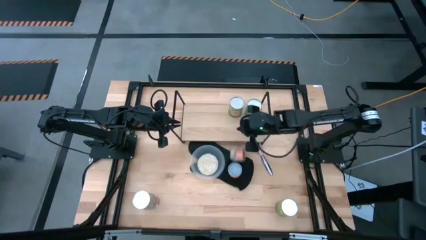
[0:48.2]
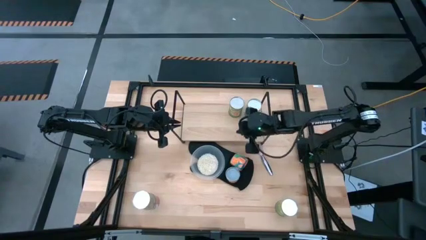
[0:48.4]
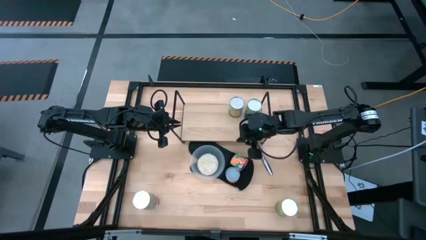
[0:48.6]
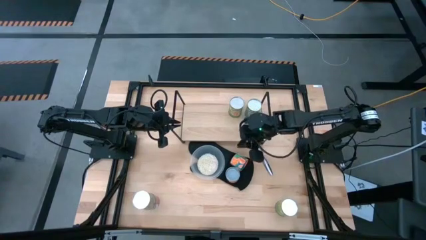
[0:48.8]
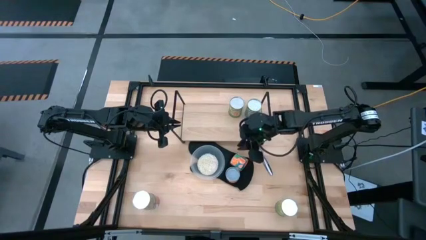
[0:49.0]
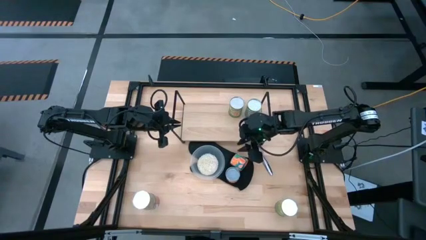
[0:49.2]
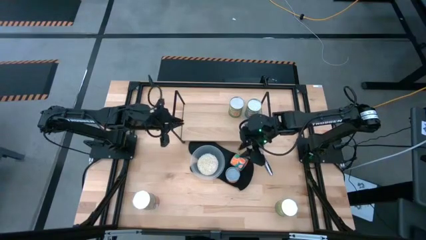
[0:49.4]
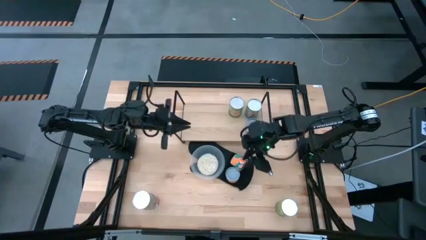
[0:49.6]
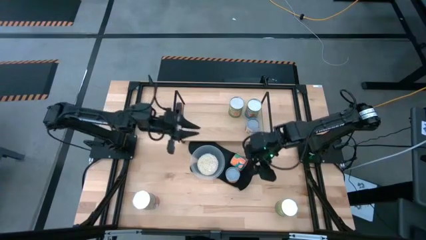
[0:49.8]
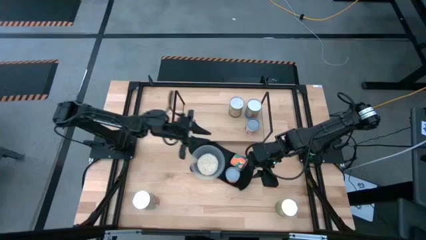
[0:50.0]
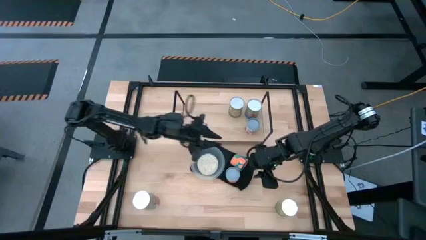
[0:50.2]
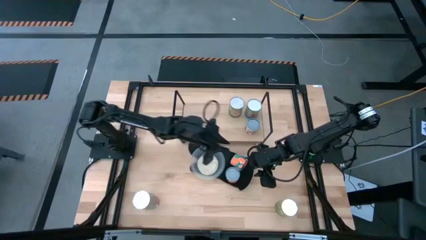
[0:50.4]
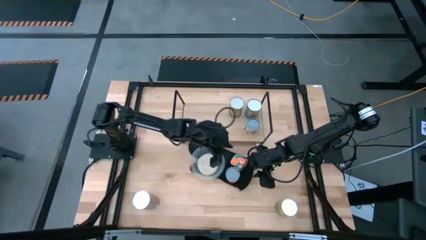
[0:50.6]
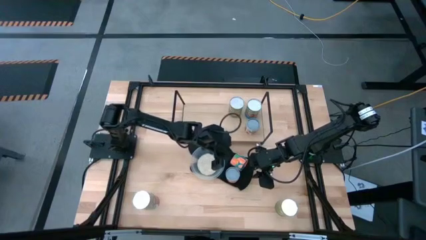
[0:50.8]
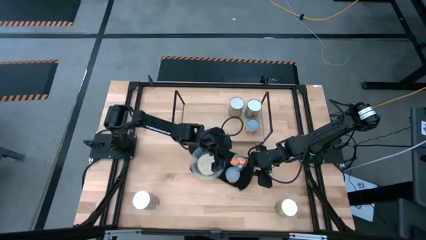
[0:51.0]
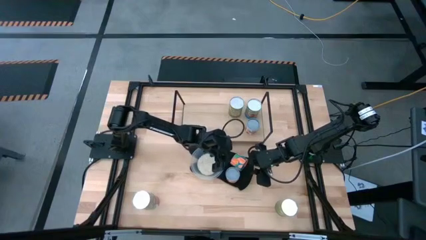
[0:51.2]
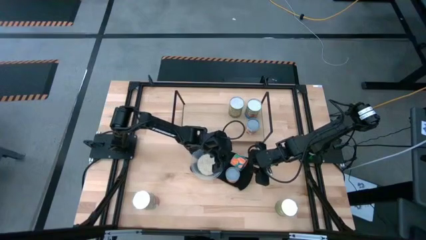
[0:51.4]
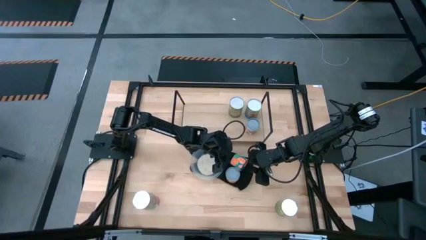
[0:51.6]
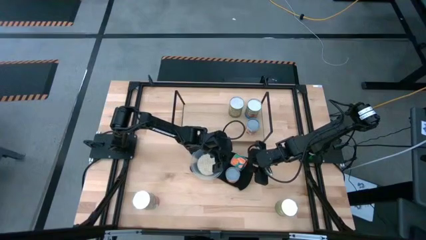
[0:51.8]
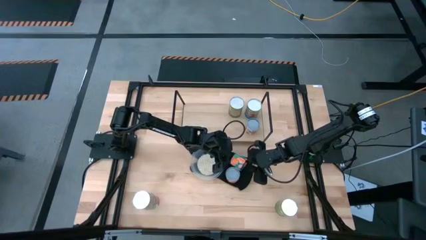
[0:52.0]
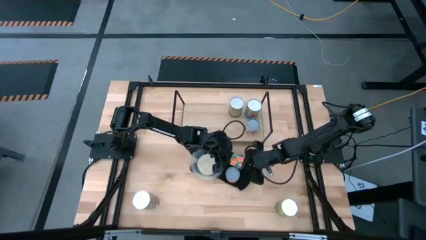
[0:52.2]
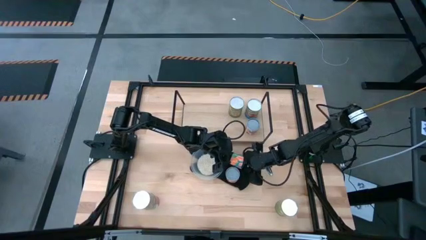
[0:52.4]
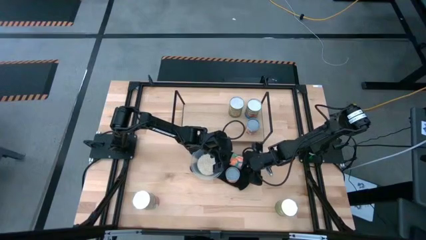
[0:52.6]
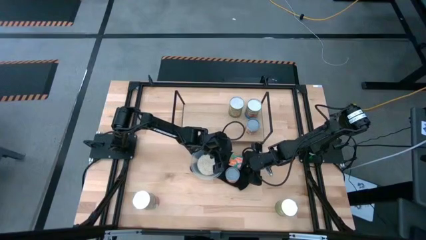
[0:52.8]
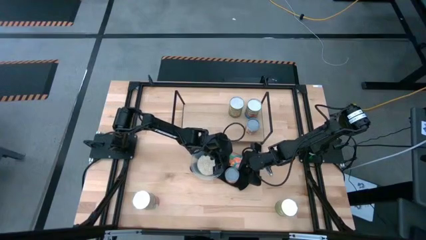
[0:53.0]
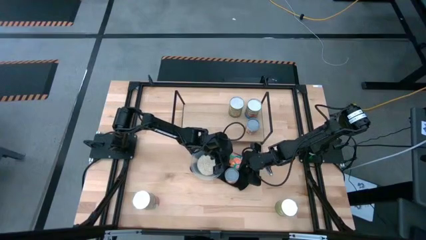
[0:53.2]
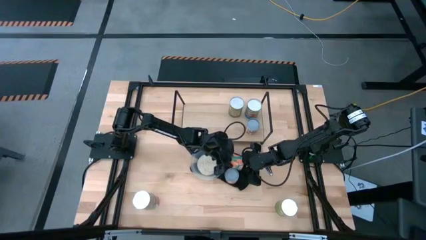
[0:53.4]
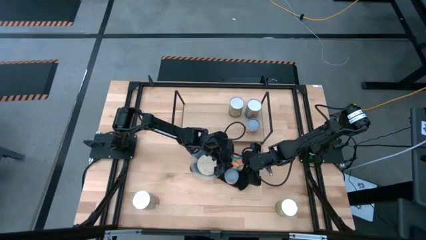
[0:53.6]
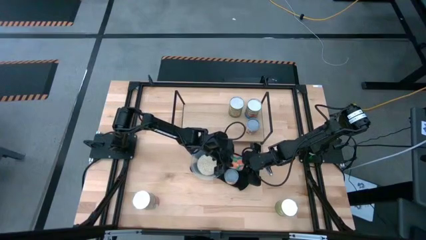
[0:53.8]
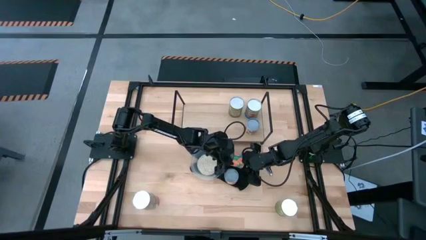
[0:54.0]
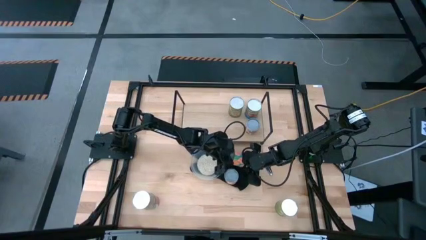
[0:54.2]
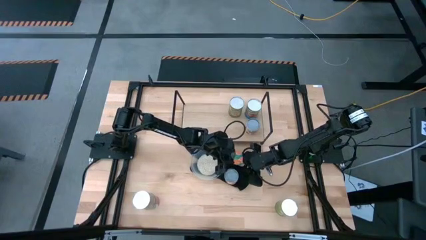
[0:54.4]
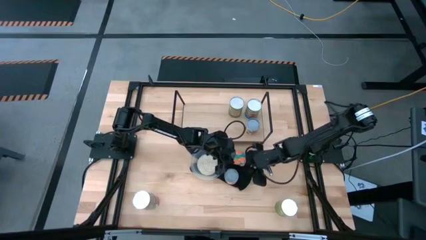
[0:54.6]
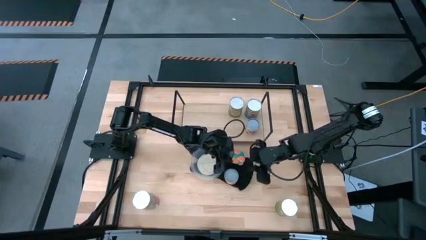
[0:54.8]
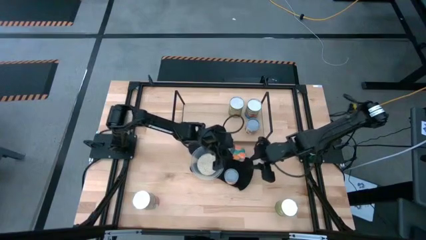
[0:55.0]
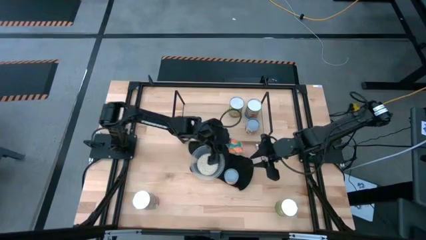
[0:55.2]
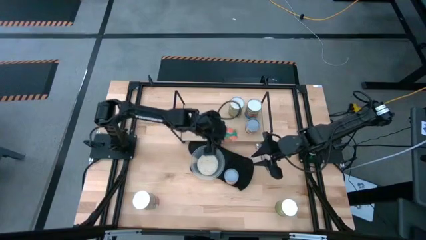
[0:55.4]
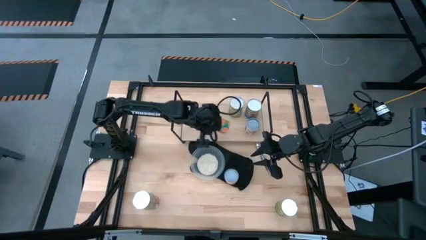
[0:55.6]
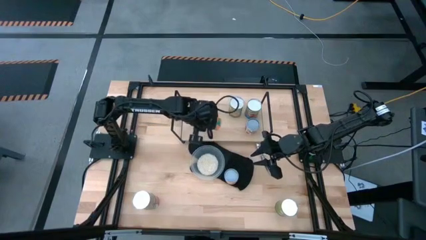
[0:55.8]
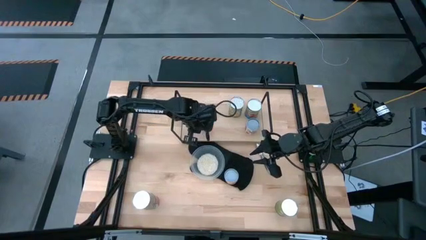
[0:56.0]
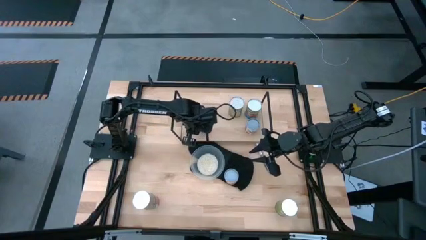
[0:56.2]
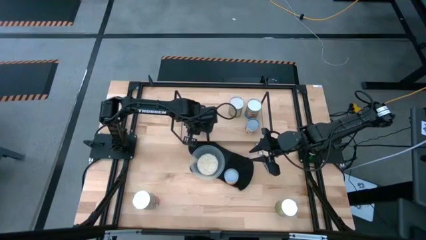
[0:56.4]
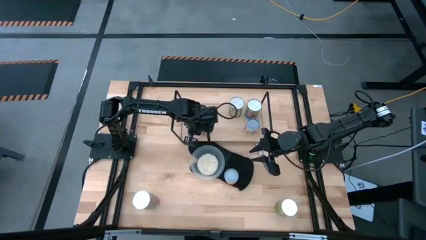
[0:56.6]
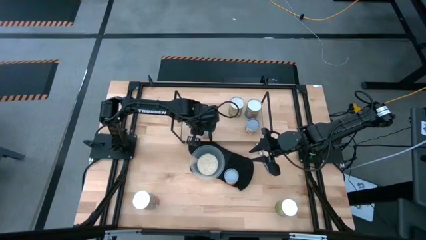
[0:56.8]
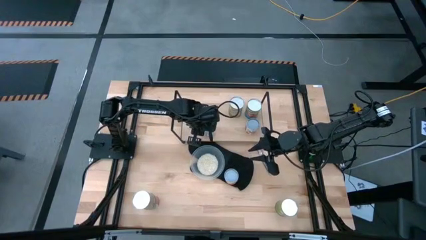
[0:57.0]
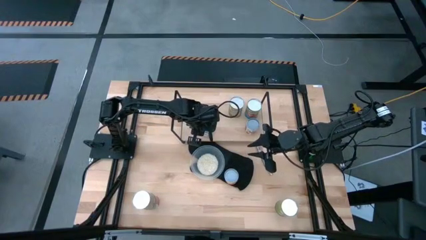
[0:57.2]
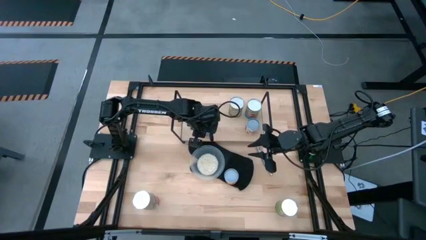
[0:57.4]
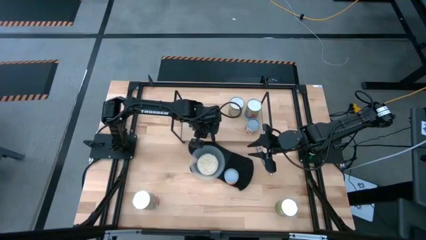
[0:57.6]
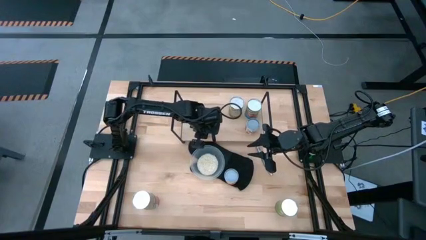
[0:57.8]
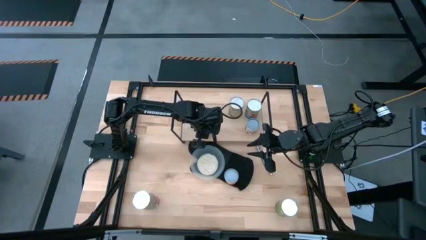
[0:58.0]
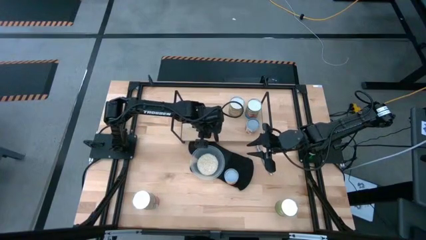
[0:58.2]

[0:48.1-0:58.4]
Task: Pick and place cans onto a shelf
Put the small canned oranges on the shelf
